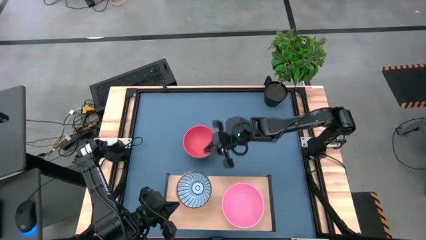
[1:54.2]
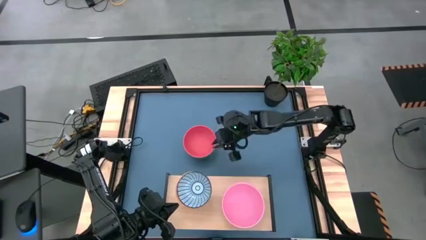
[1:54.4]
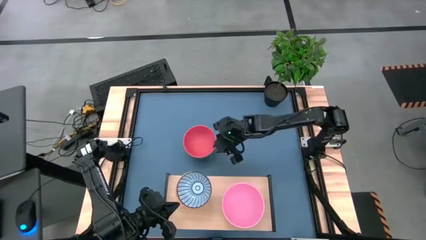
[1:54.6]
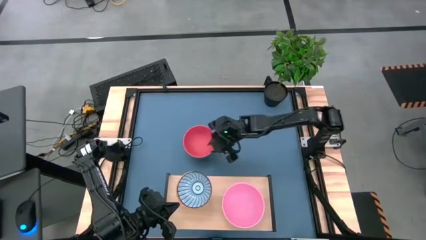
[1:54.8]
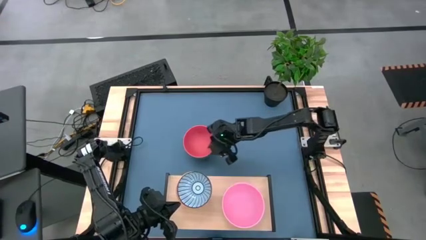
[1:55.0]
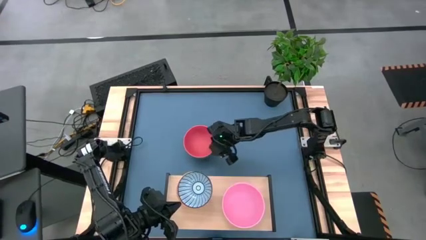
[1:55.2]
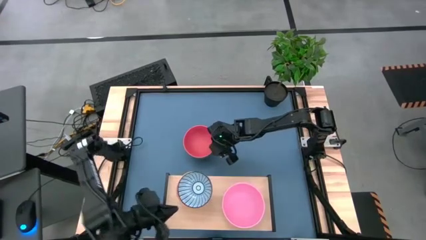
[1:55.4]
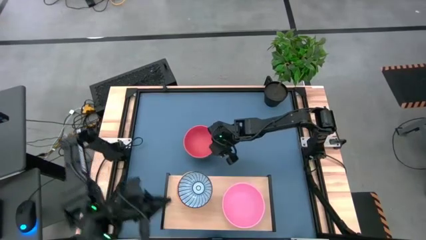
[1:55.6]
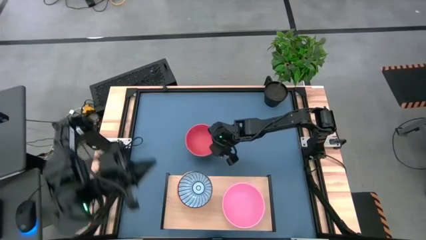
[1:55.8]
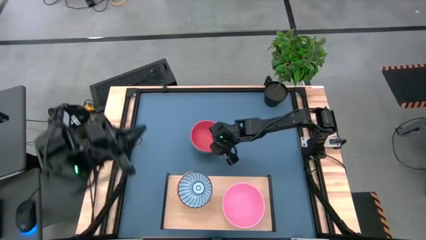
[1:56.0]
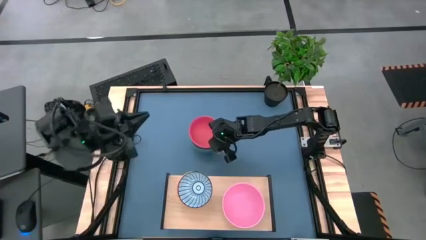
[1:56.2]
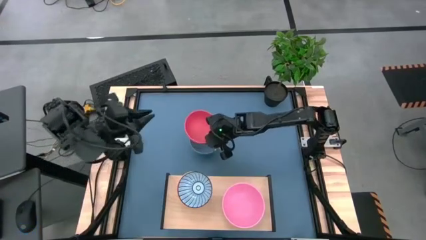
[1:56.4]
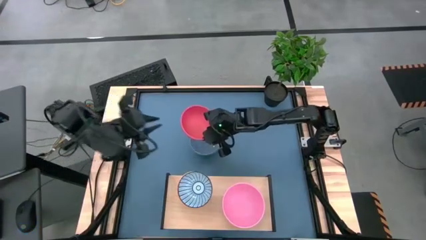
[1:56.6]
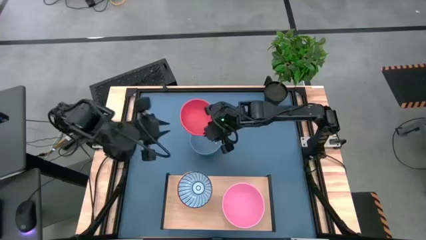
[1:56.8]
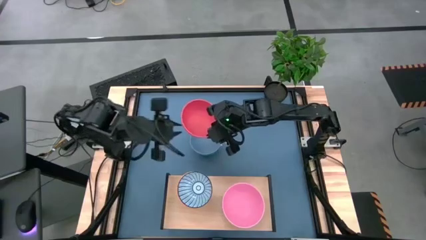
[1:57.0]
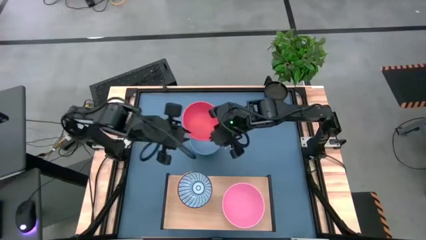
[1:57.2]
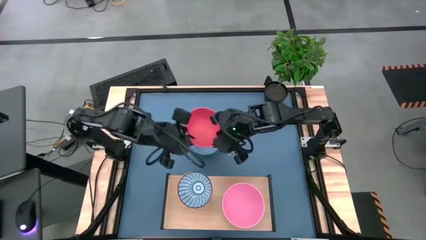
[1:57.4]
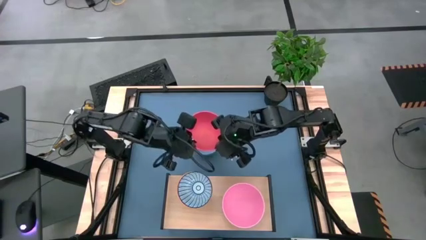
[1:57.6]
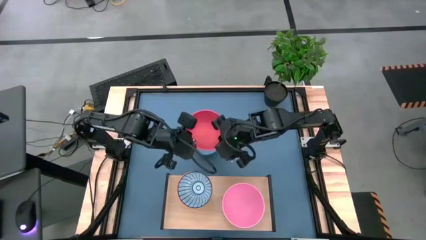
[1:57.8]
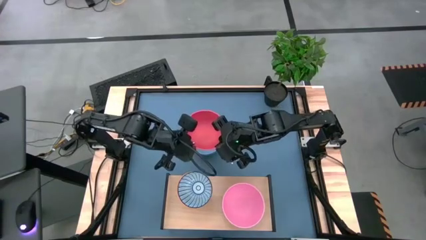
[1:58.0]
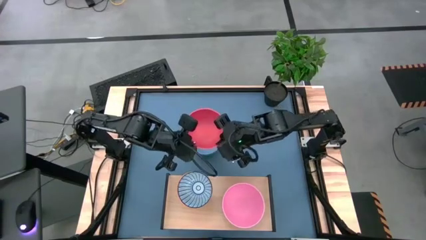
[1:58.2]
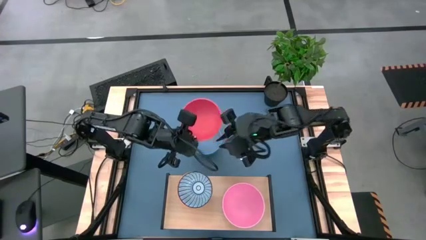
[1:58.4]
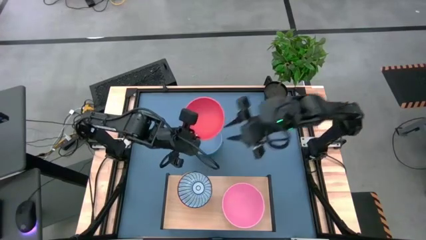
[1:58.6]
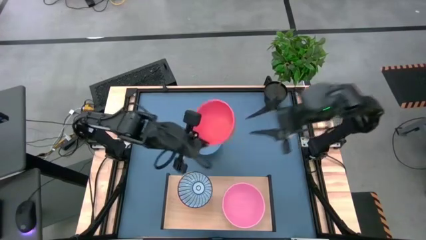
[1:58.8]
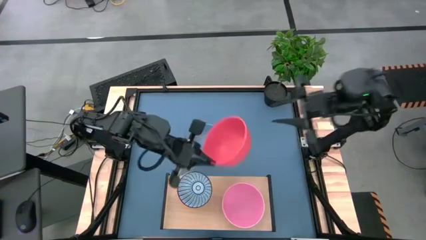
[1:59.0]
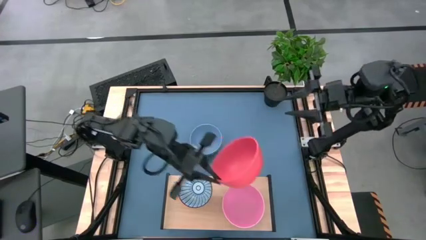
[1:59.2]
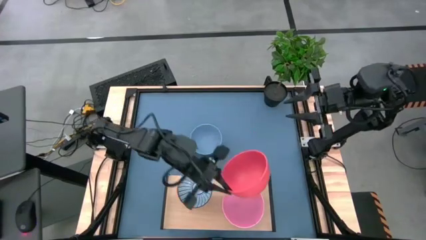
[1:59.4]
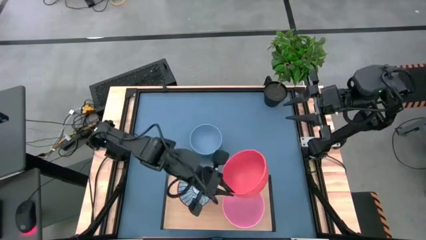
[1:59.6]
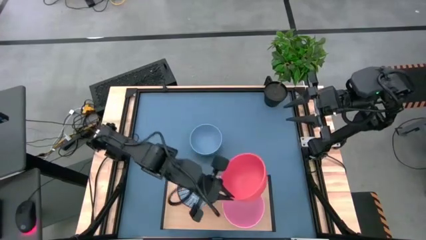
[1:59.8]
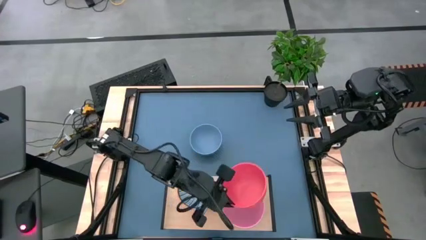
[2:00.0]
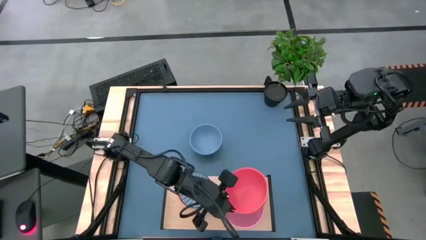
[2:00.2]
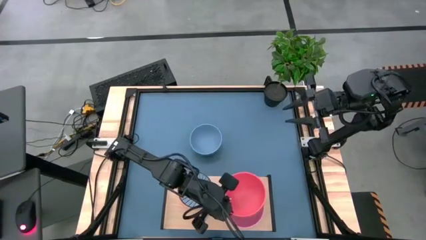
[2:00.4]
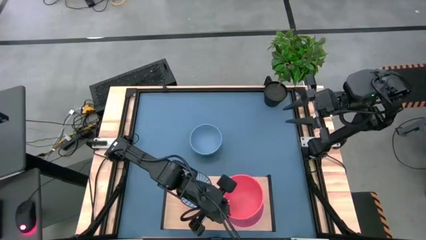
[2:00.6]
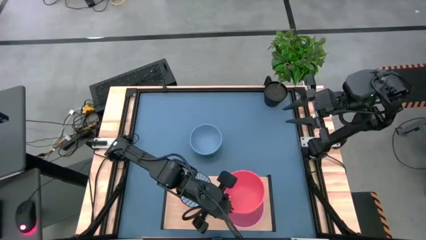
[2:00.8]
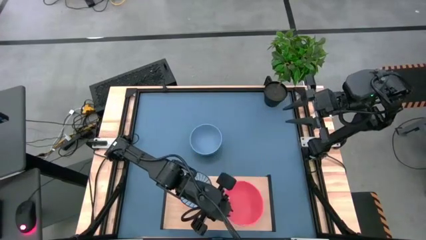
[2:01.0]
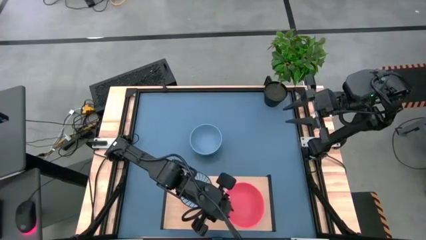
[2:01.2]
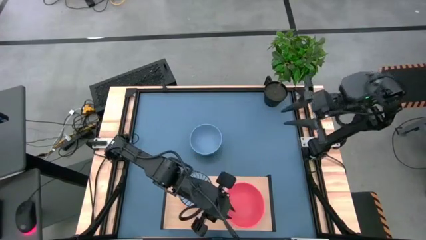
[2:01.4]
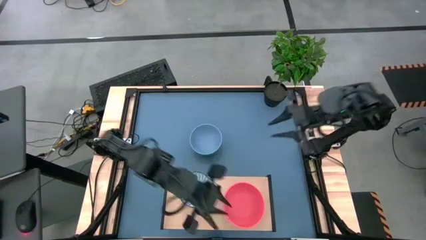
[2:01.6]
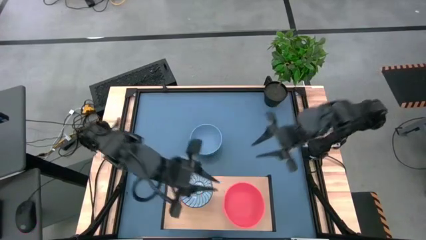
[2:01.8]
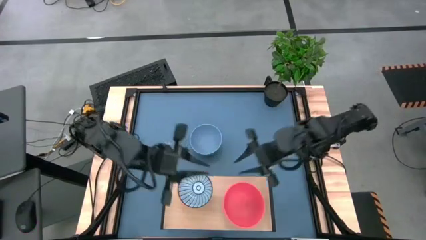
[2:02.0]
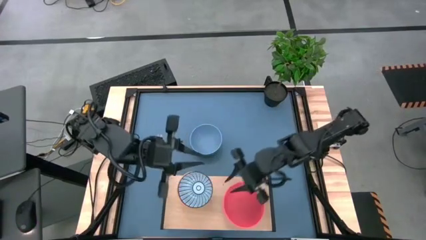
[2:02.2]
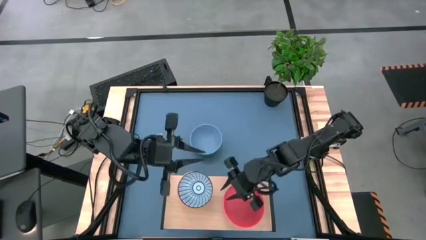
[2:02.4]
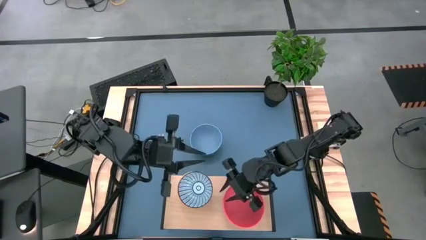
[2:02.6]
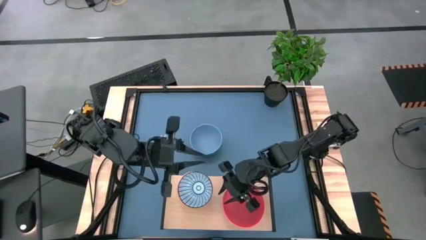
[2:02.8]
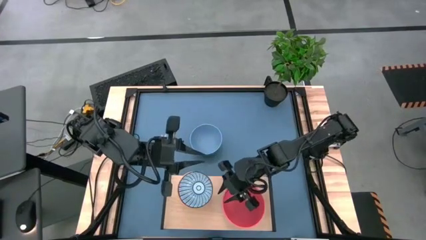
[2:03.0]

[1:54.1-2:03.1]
Task: Place and stack bowls onto a shelf
Stack the orange bowl on top of the pink bowl on the shelf

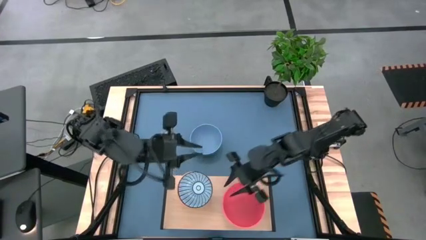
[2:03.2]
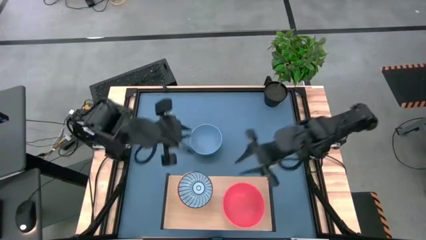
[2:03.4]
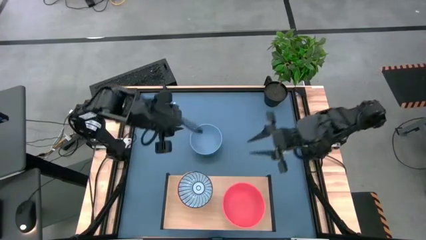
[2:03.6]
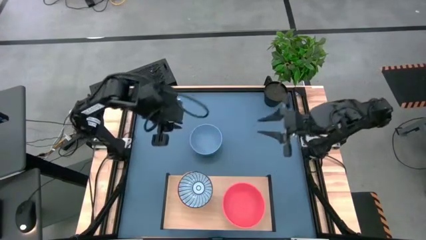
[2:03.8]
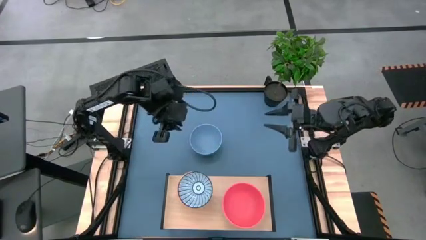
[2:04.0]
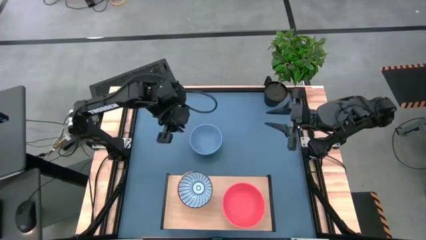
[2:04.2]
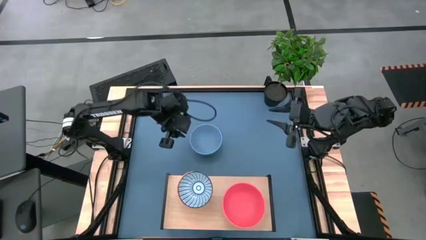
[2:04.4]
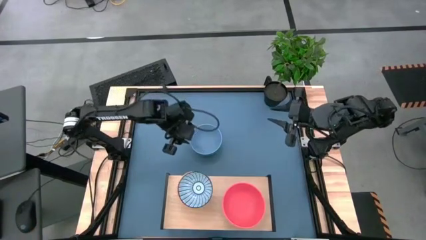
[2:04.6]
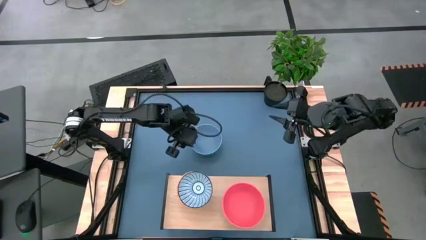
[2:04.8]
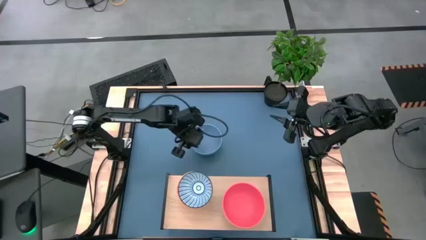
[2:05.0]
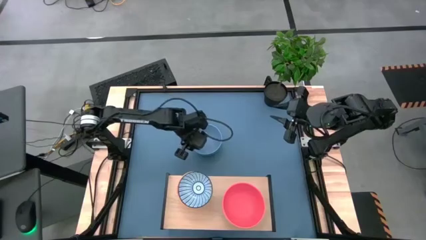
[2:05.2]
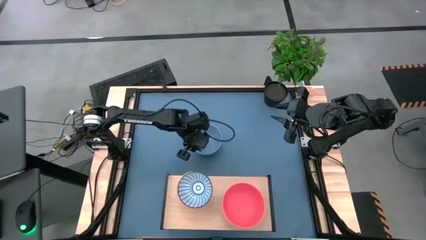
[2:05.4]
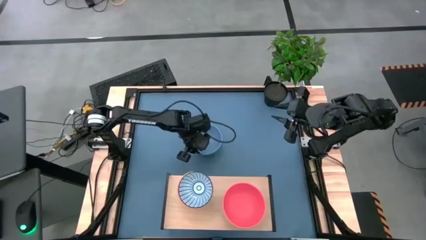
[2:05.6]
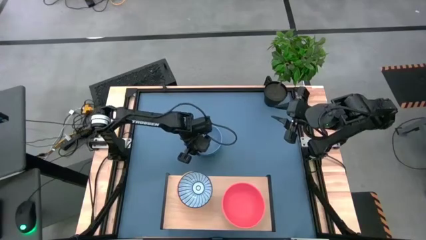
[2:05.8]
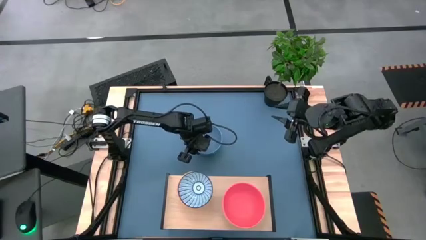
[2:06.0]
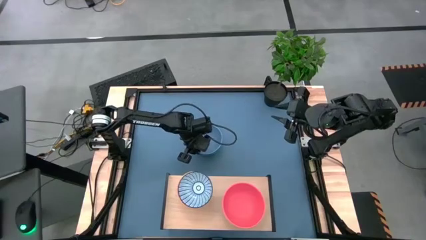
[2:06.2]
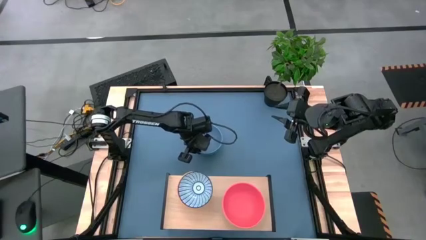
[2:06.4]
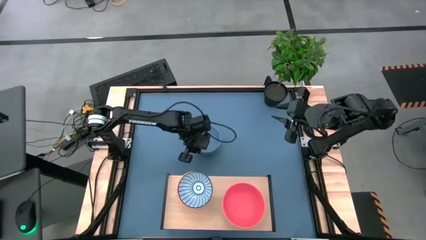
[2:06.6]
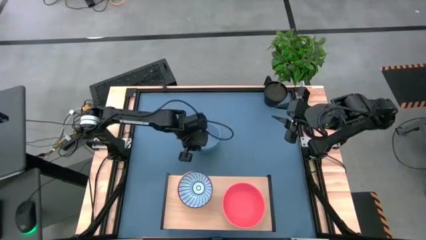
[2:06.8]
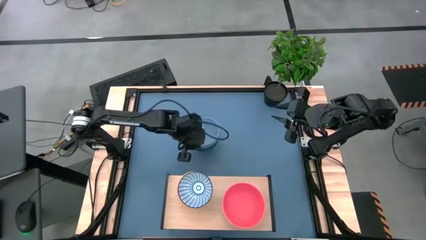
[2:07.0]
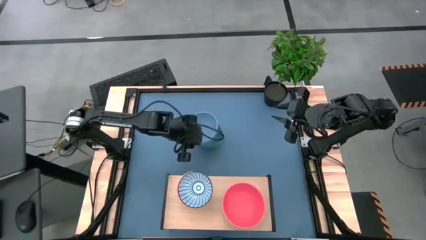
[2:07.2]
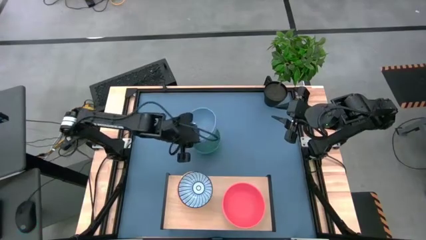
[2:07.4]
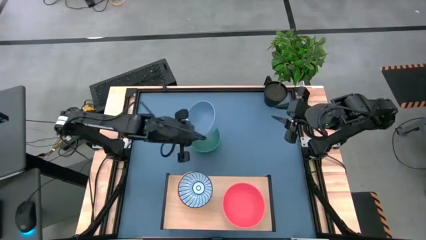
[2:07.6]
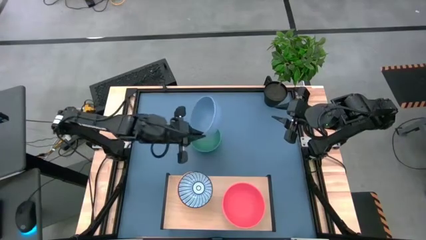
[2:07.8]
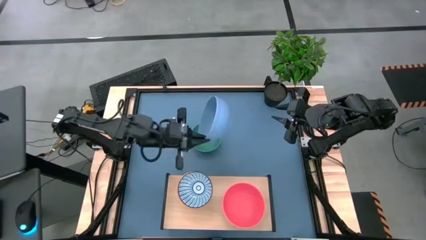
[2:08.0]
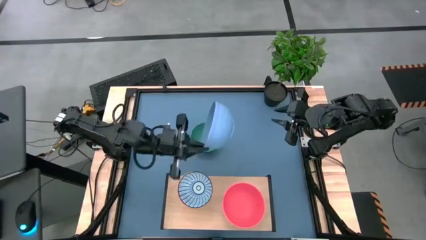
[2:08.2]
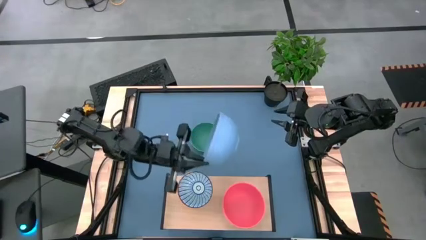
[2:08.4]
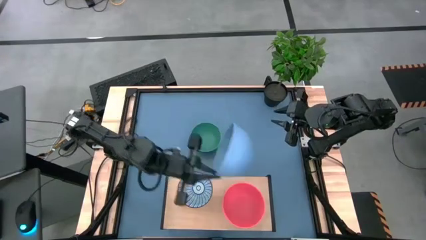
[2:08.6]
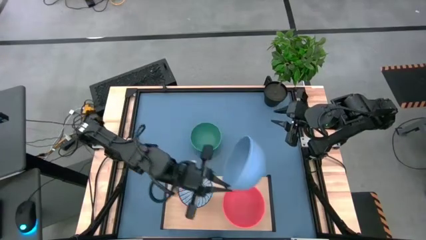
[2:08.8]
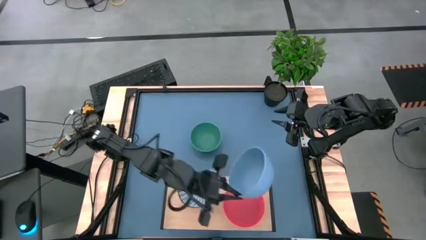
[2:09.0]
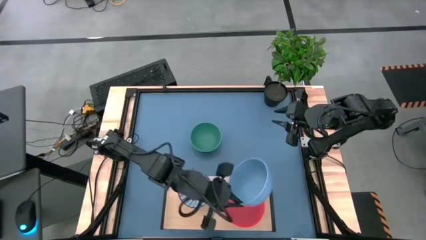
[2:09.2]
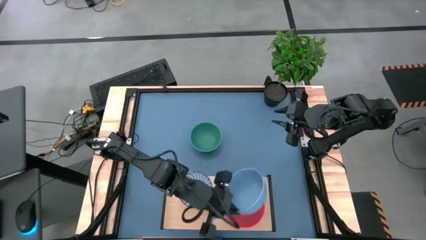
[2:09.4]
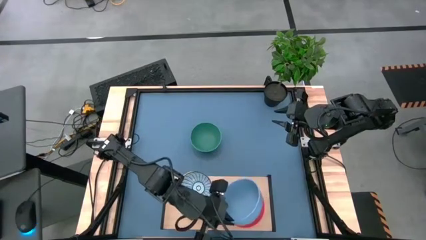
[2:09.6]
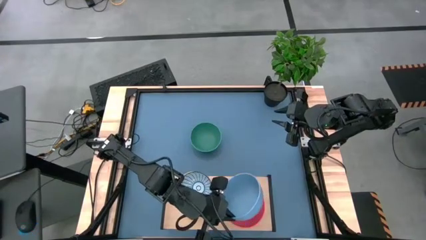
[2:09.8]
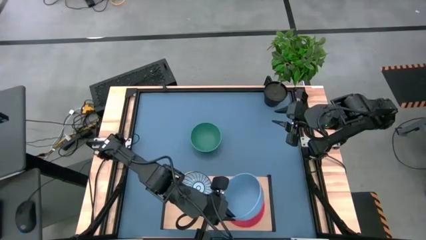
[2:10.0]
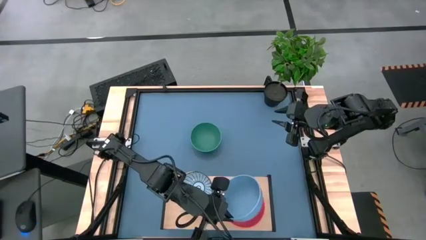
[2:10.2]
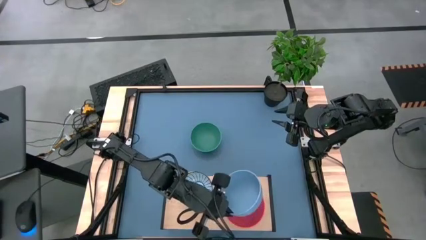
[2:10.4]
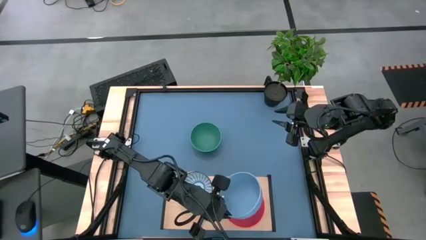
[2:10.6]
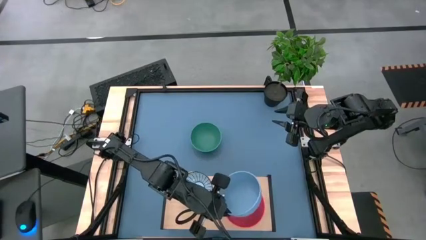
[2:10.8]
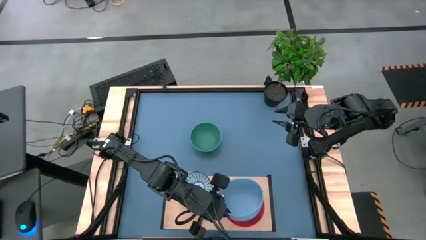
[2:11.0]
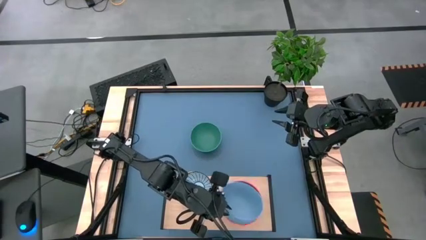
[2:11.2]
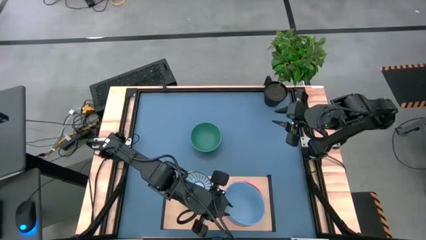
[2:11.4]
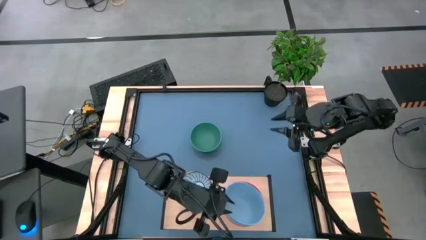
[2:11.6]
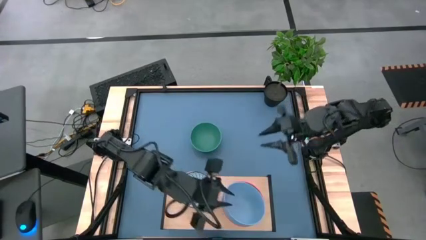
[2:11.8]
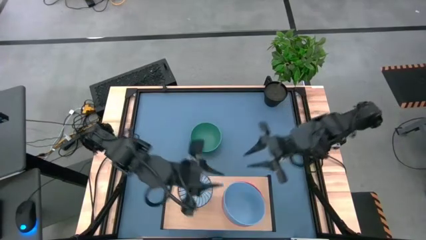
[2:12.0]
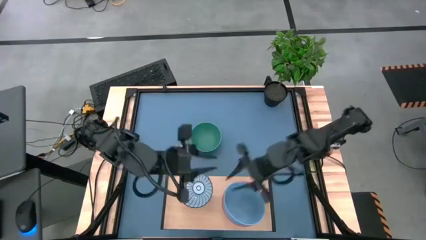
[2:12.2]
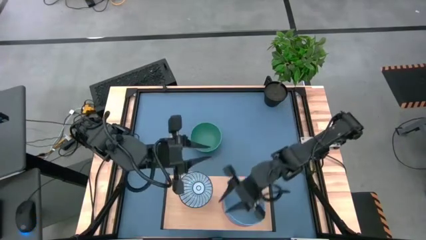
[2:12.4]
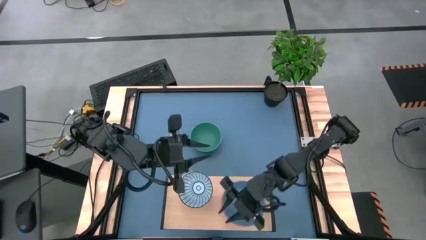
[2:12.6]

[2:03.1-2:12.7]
Stack the blue bowl on top of the red bowl on the shelf
